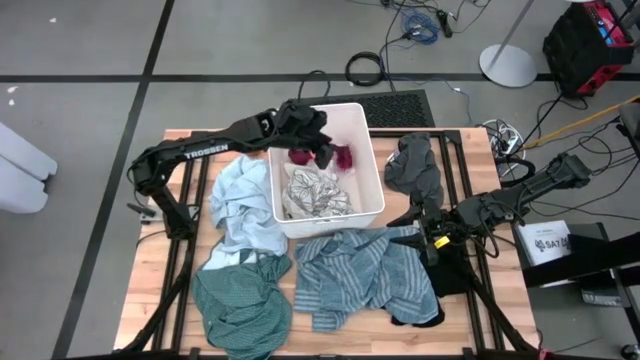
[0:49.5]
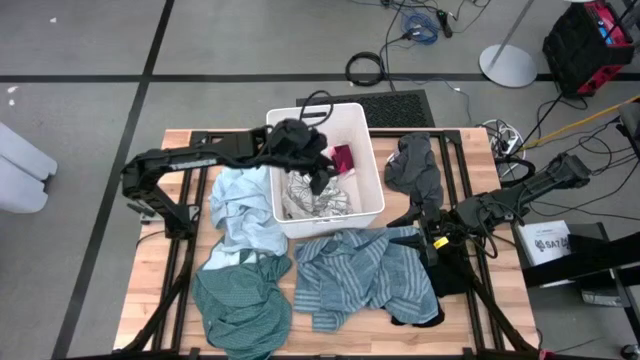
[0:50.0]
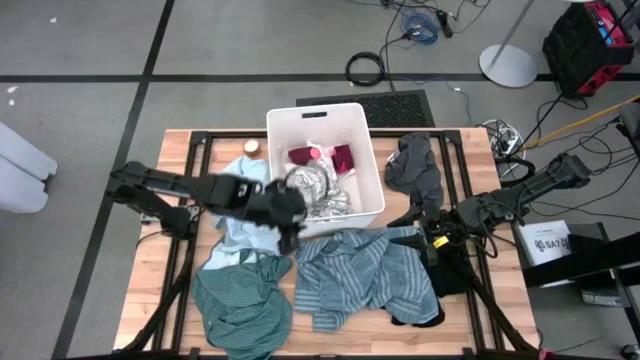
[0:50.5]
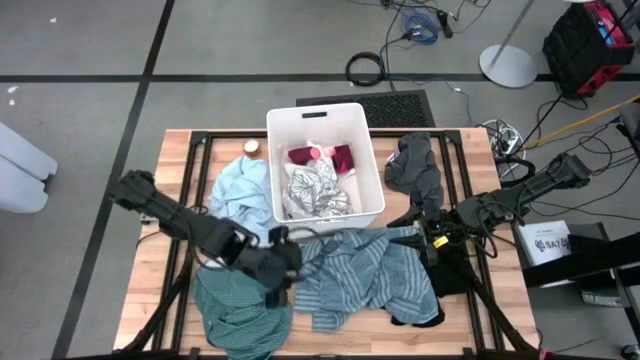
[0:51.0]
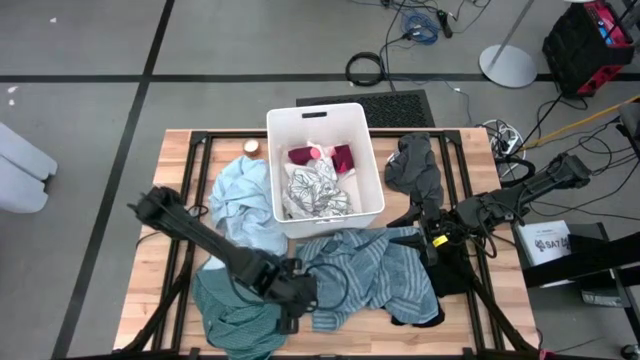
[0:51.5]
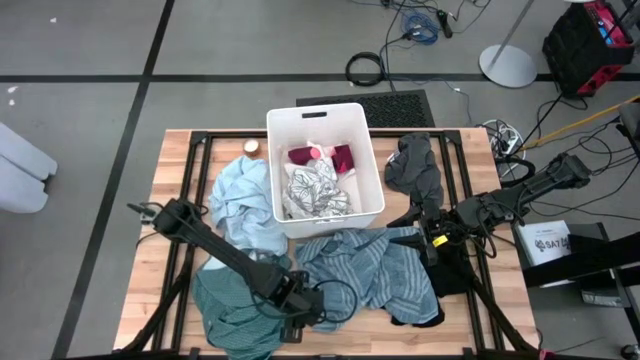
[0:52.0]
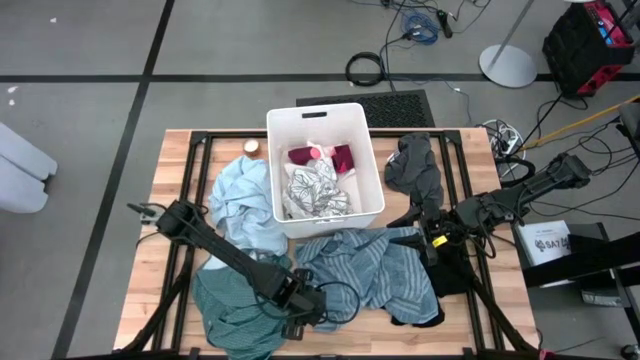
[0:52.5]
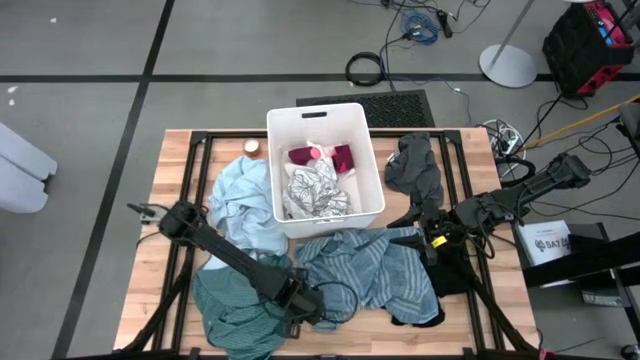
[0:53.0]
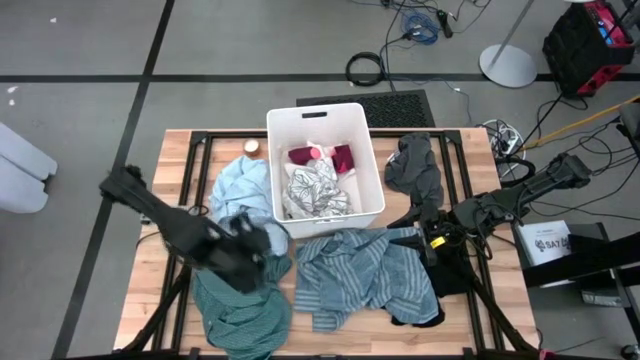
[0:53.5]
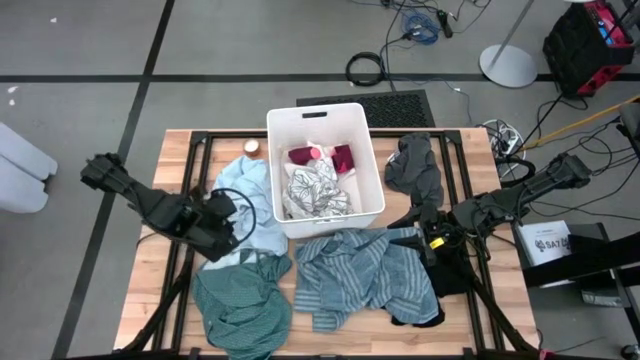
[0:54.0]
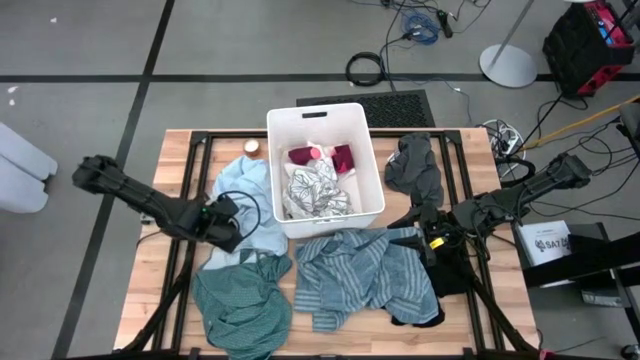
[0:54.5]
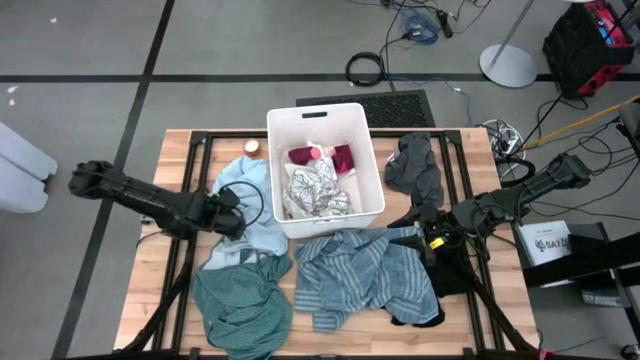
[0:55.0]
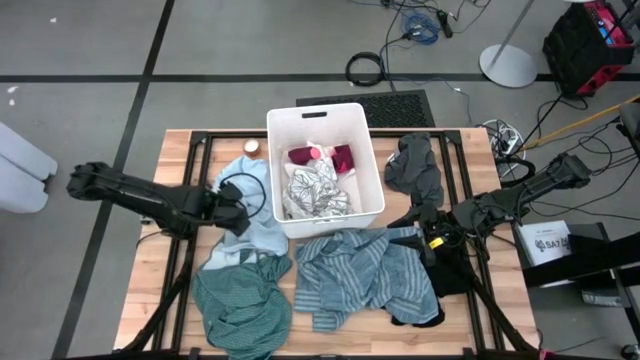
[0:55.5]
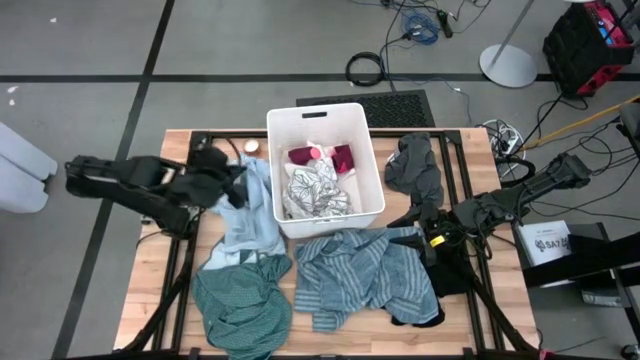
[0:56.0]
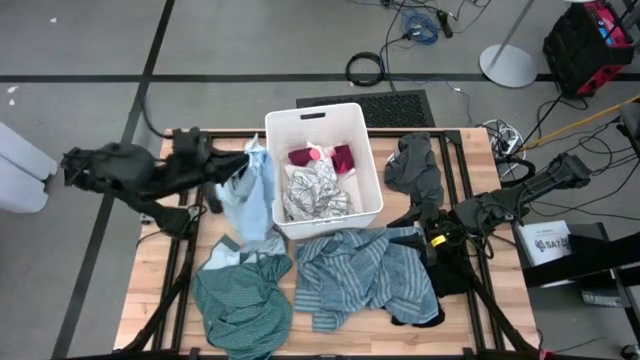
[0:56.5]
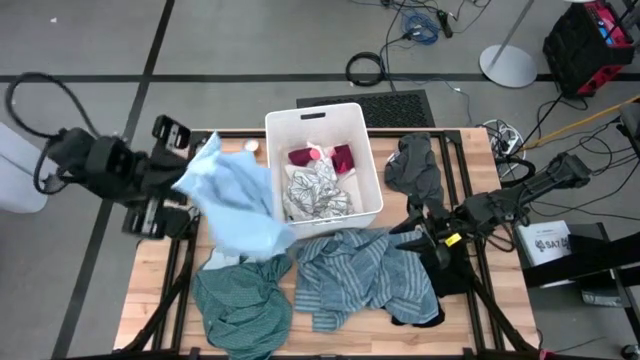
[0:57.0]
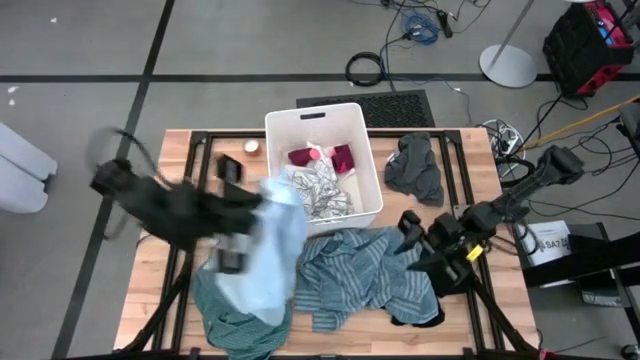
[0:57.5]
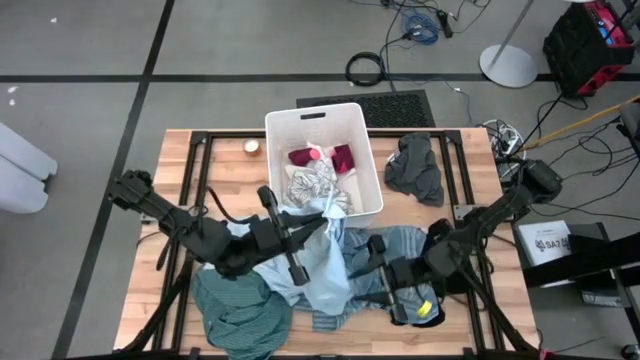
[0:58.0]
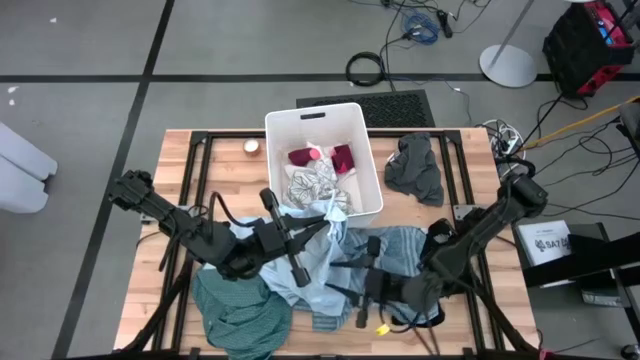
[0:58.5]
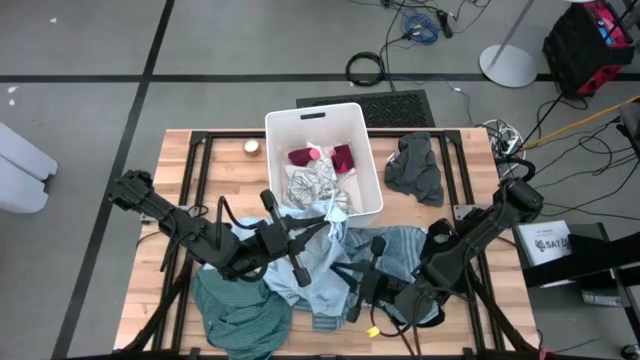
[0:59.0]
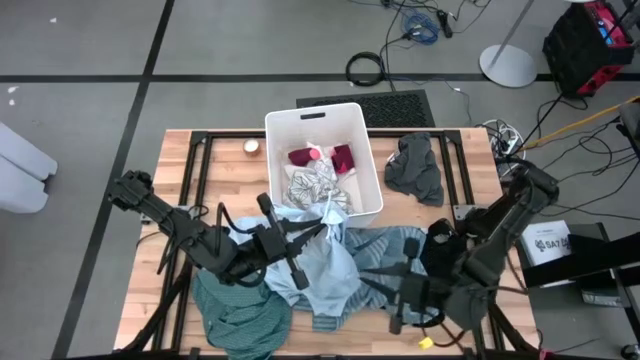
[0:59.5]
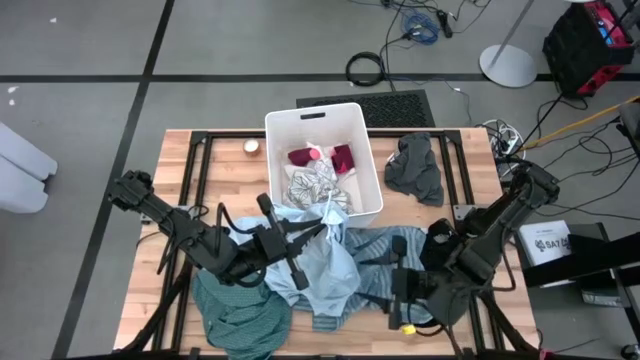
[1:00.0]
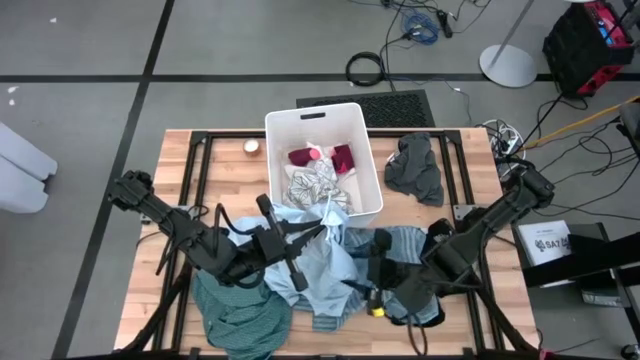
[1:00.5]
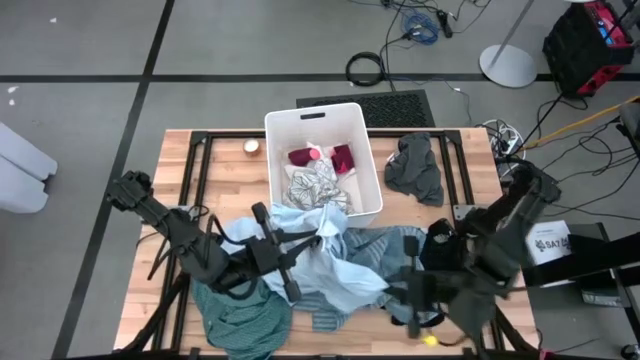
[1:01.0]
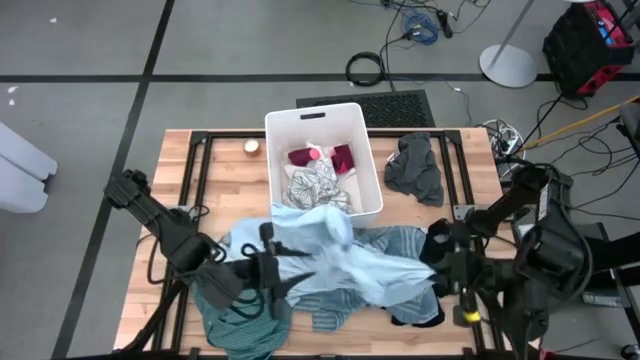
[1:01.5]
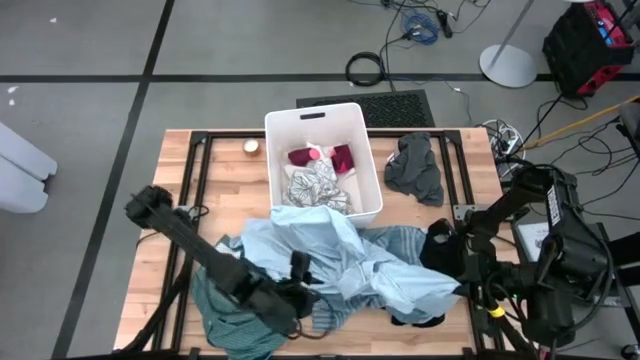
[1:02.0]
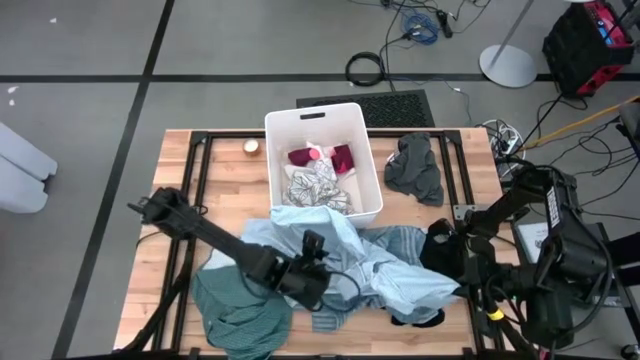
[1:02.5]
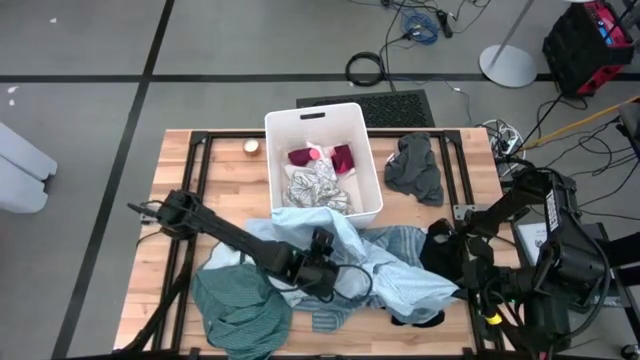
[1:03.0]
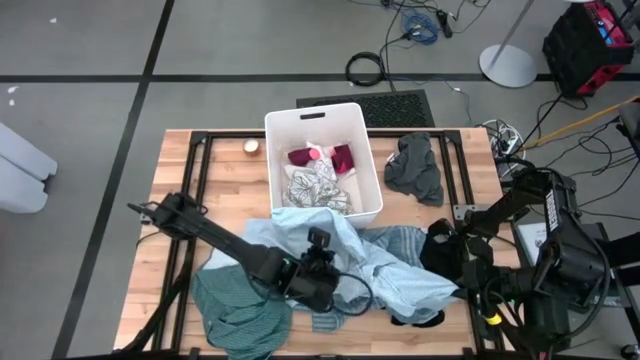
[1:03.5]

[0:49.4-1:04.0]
Task: Sort clothes
Put the light blue shirt into the white laundry bin

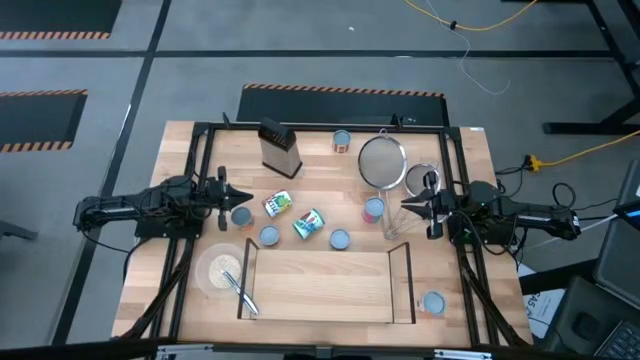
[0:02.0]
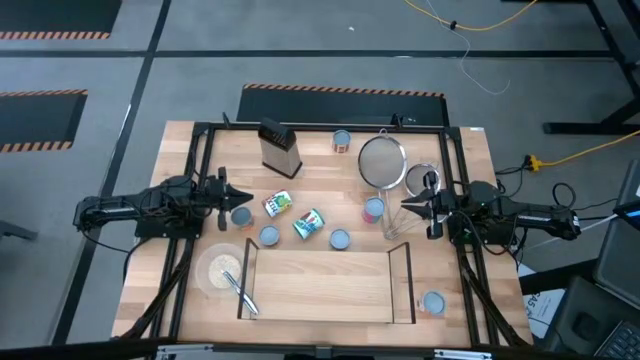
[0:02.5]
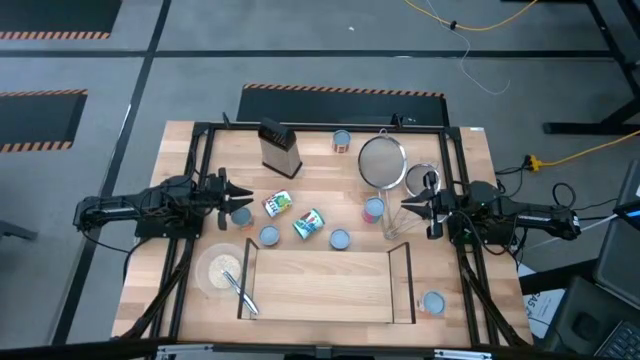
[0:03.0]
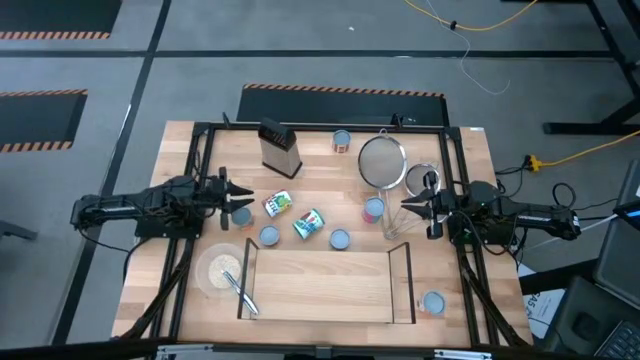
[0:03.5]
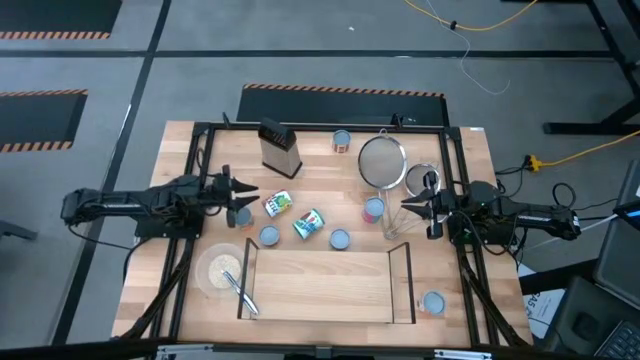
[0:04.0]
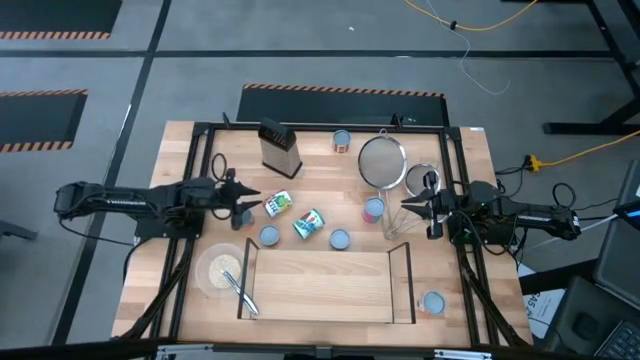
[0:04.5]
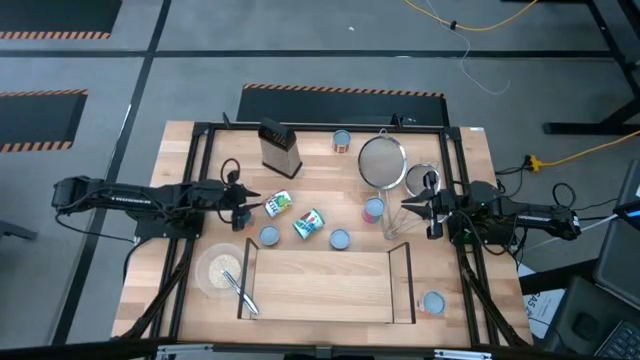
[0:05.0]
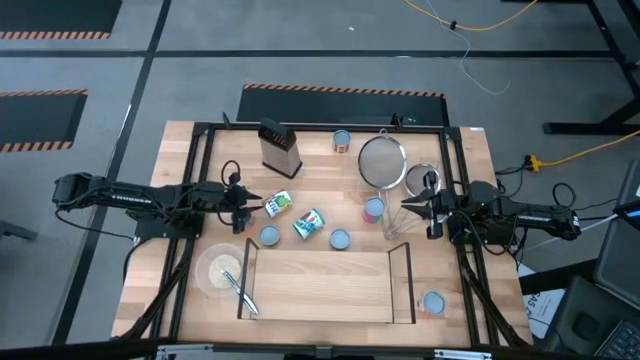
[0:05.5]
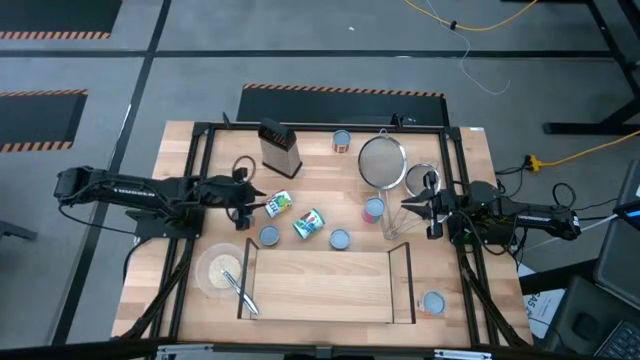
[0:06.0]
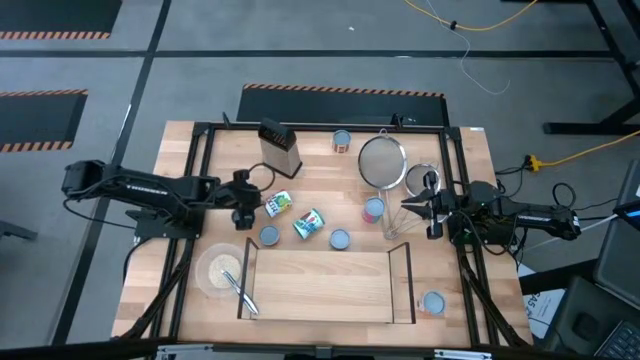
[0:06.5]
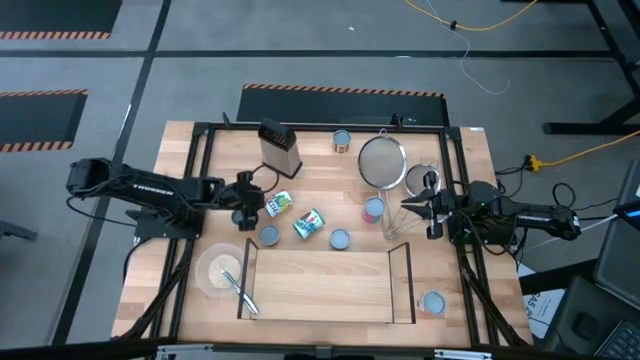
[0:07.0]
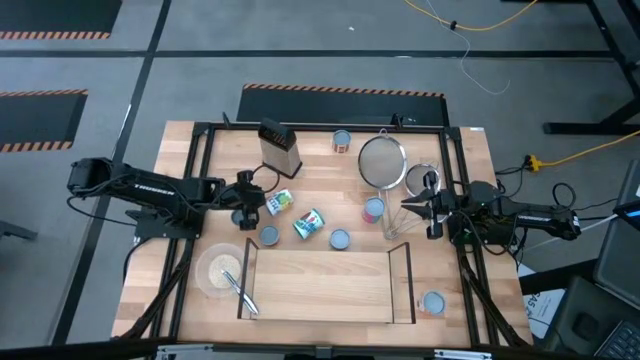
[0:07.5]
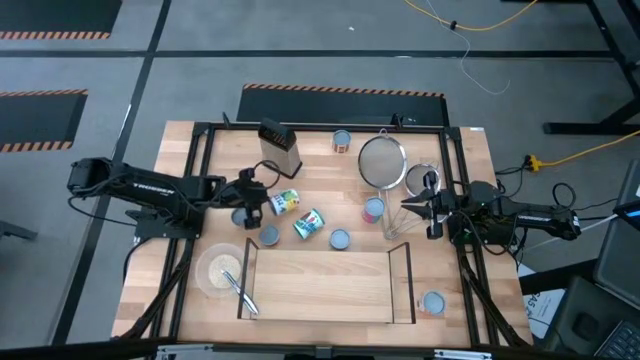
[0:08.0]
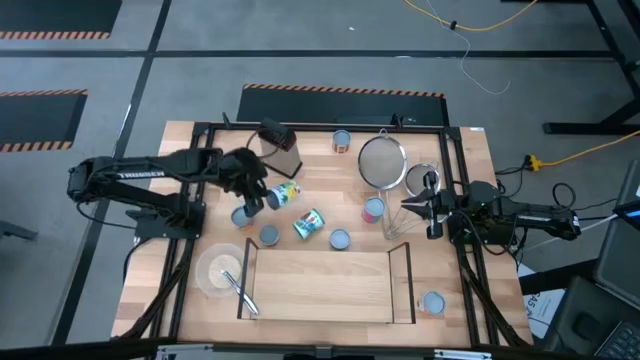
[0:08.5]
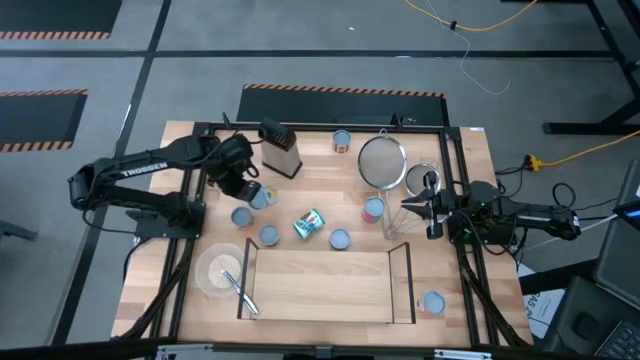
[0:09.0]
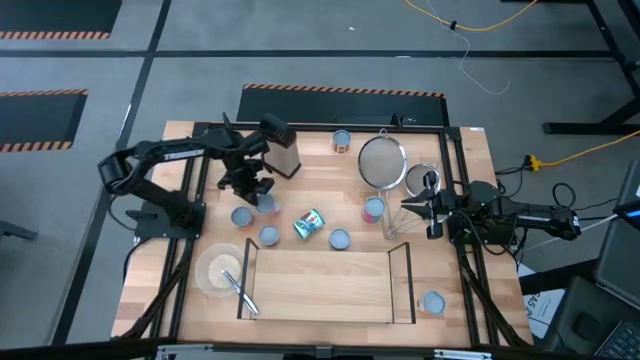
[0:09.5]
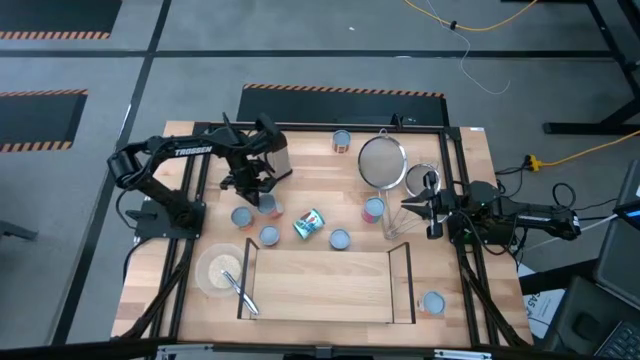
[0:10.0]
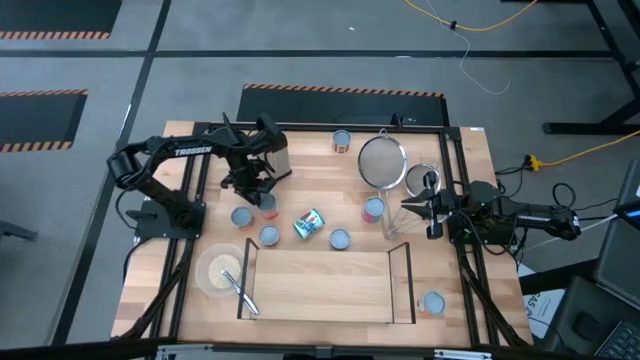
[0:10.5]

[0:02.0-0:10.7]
Task: Pick and place cans onto a shelf
Adjust the white canned mix fruits
